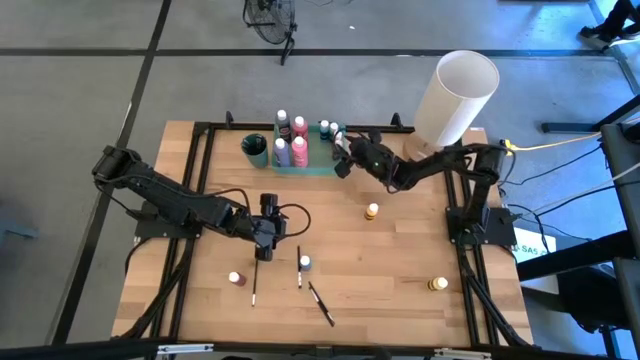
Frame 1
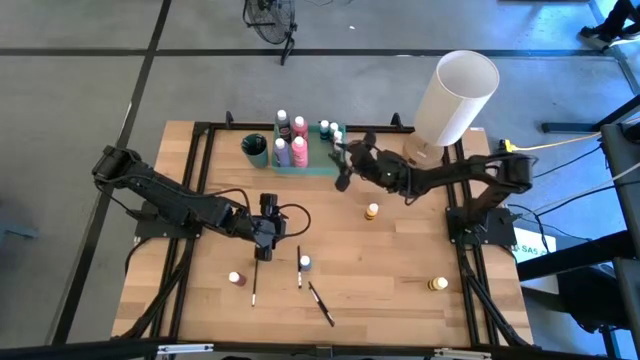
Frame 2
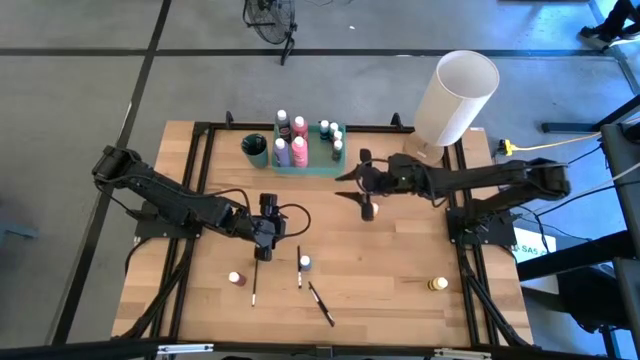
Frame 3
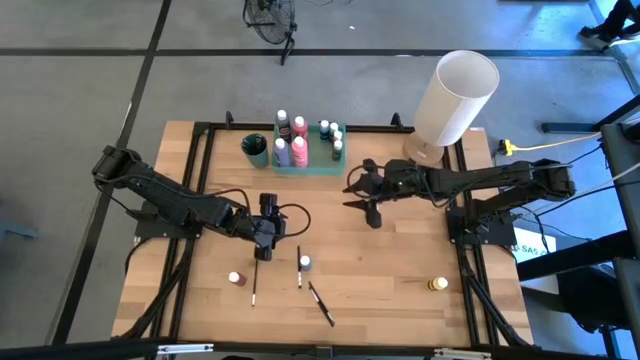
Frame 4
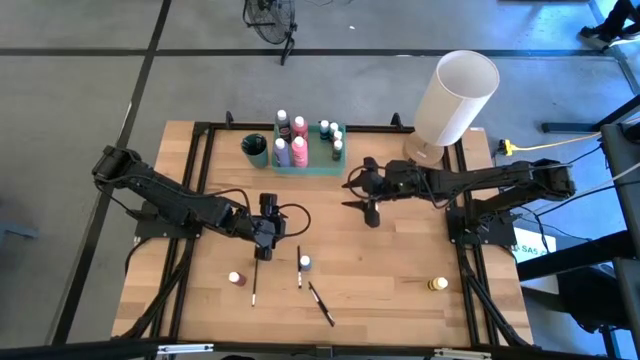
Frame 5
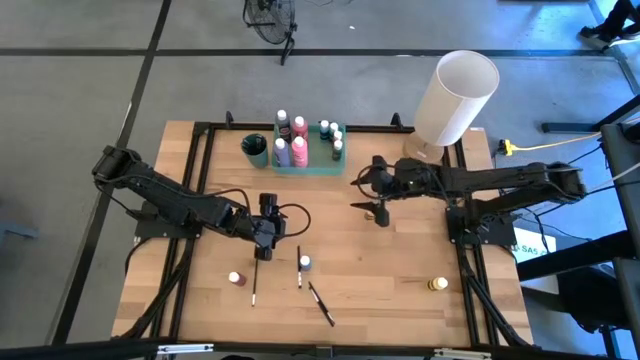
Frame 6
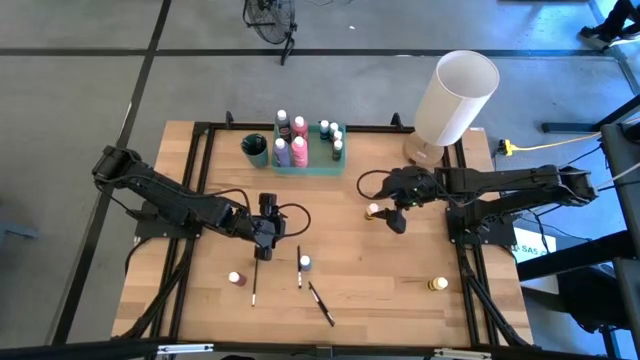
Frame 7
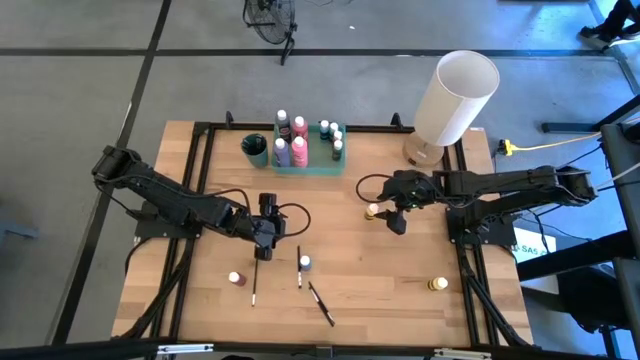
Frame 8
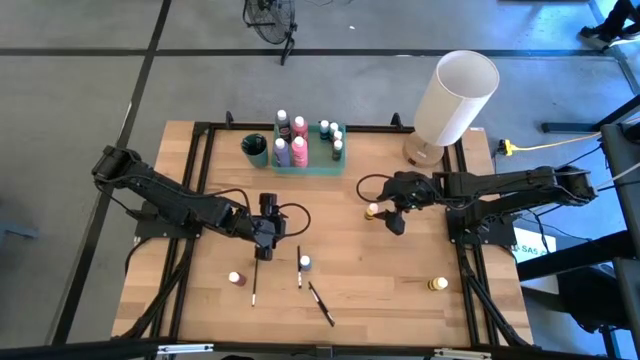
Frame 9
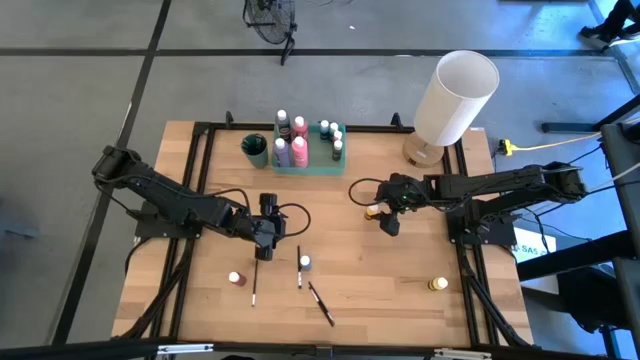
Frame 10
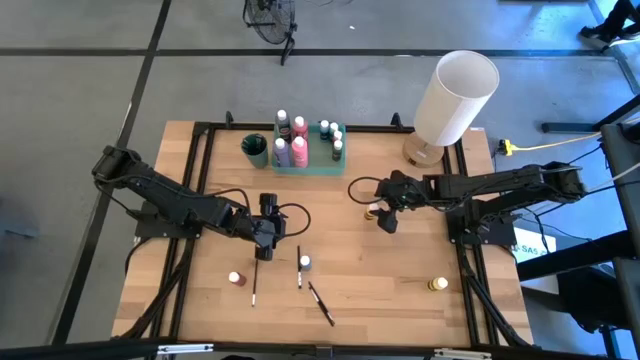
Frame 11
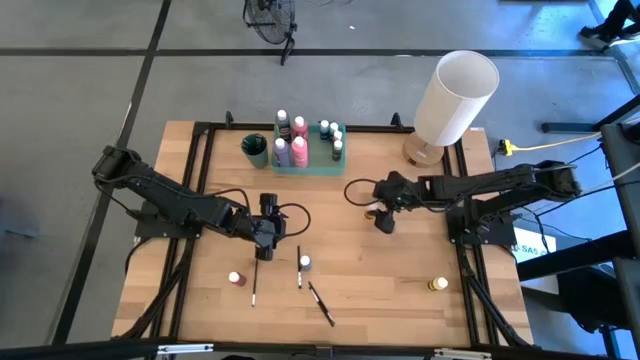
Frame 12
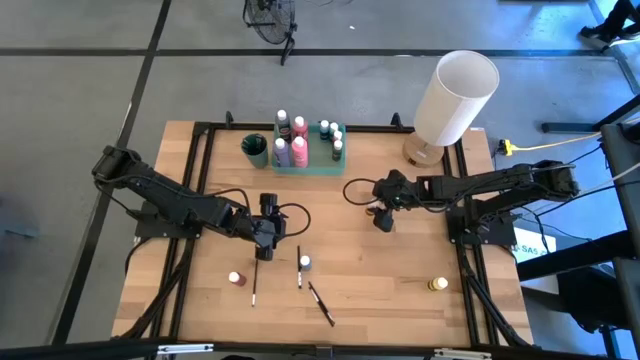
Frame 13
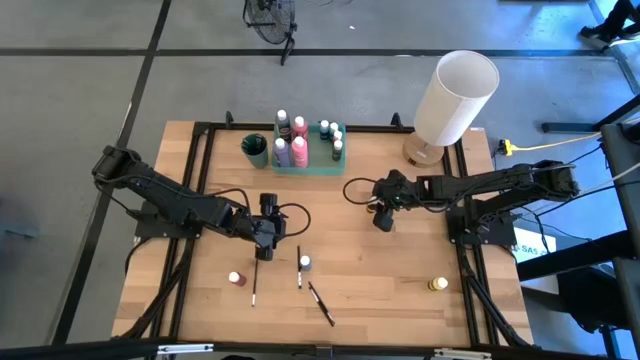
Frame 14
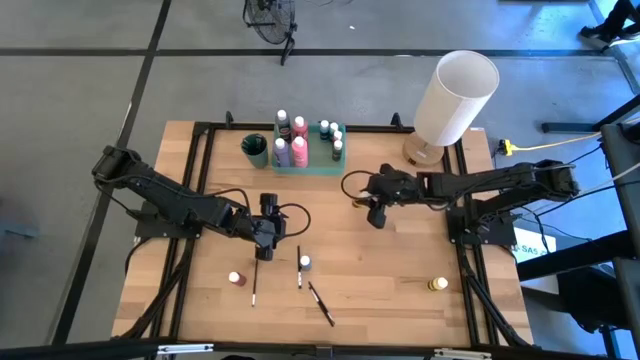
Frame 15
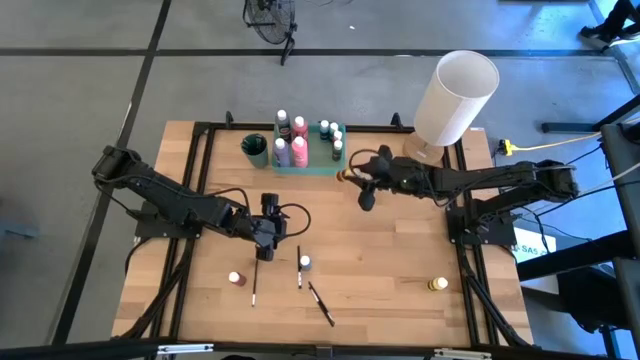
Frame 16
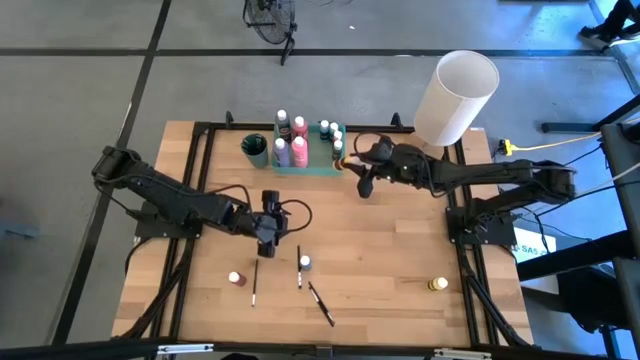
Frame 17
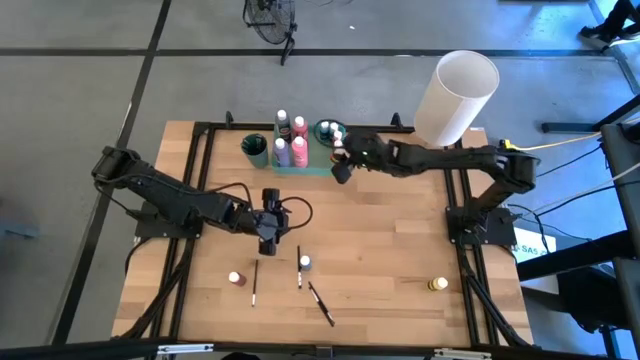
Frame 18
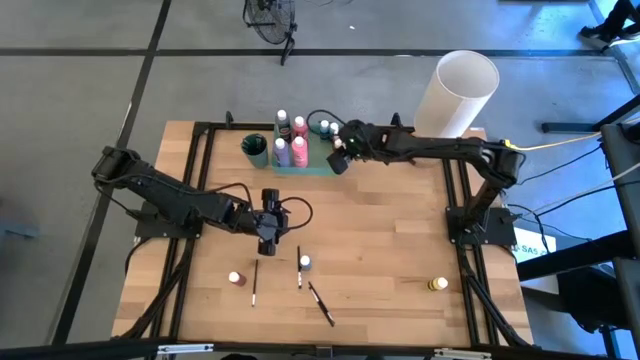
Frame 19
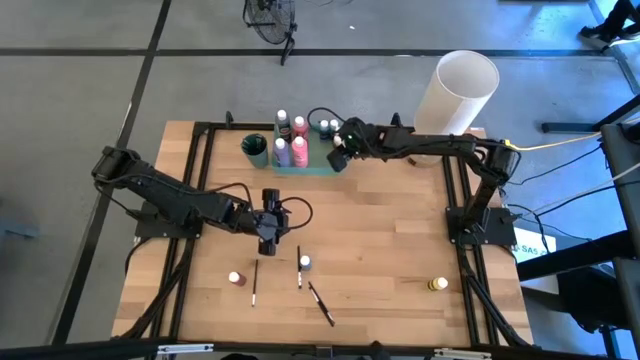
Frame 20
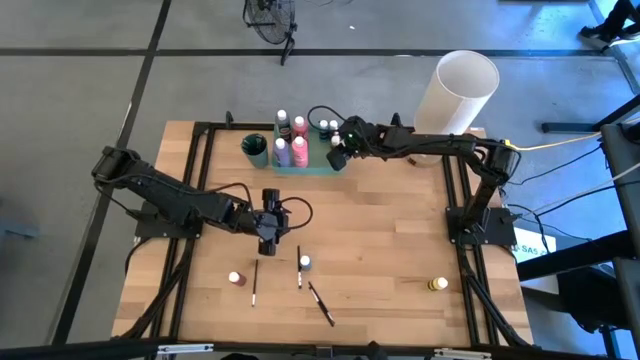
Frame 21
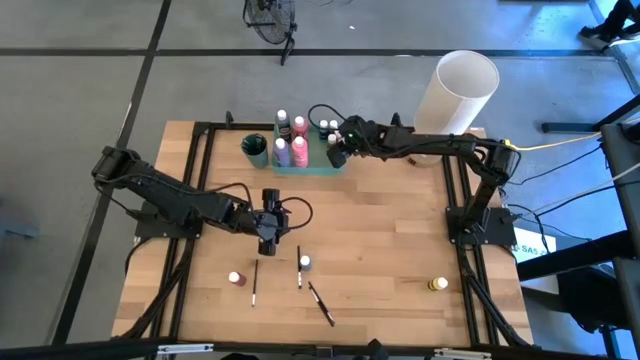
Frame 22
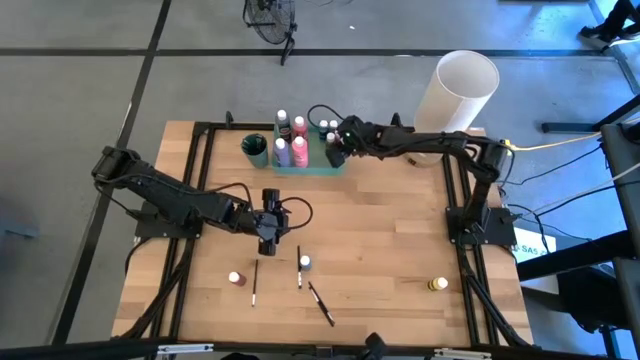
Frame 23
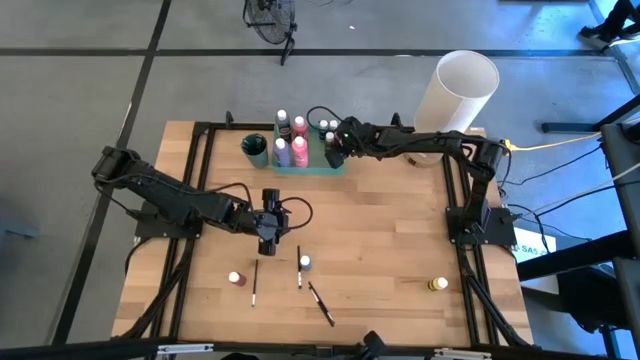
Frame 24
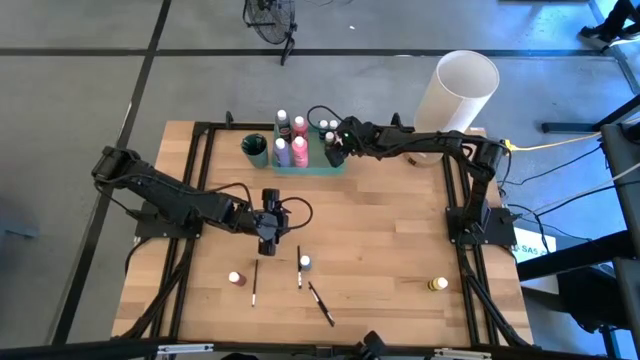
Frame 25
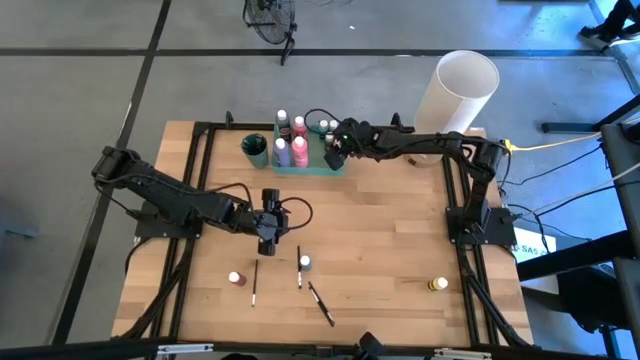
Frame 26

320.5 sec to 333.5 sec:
Task: Pick & Place Paint Supplies
Put the top small yellow paint bottle into the green bin

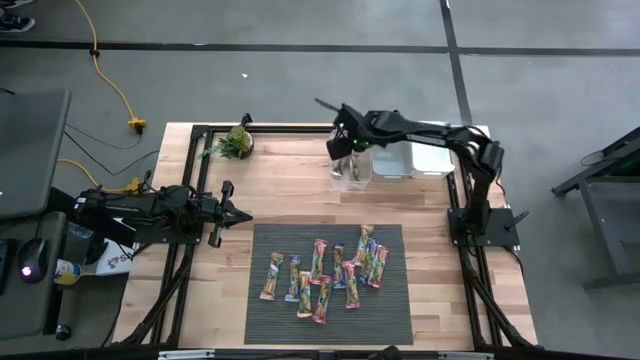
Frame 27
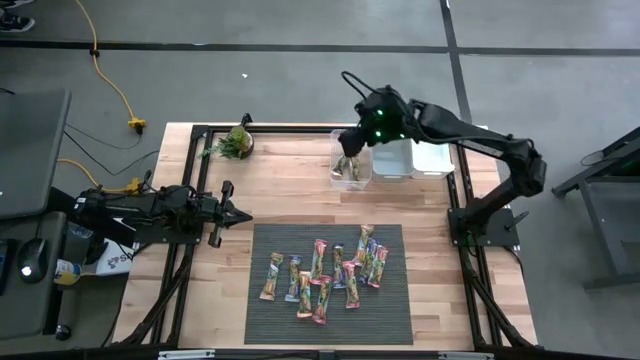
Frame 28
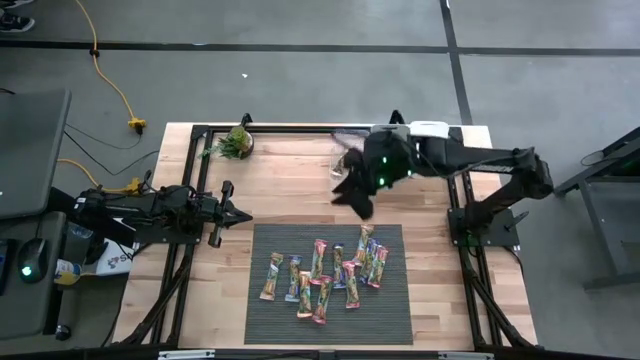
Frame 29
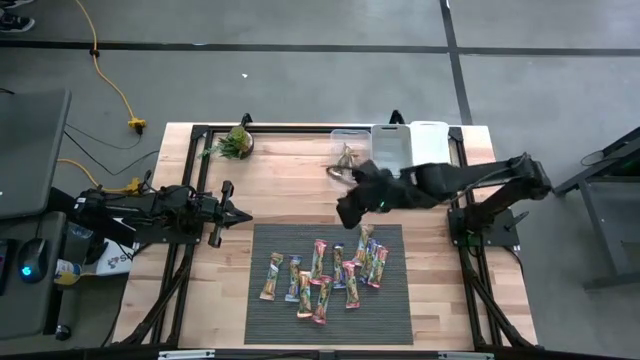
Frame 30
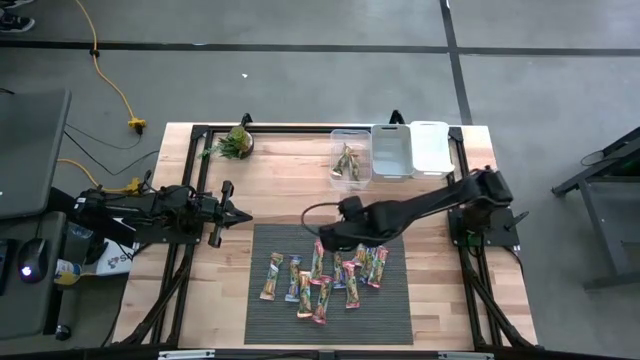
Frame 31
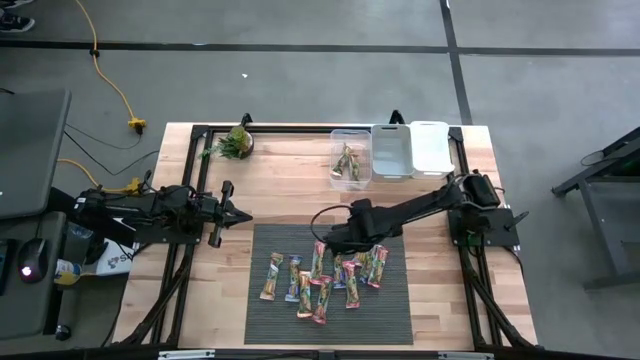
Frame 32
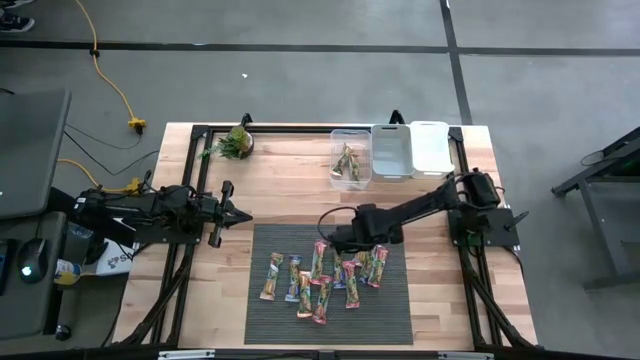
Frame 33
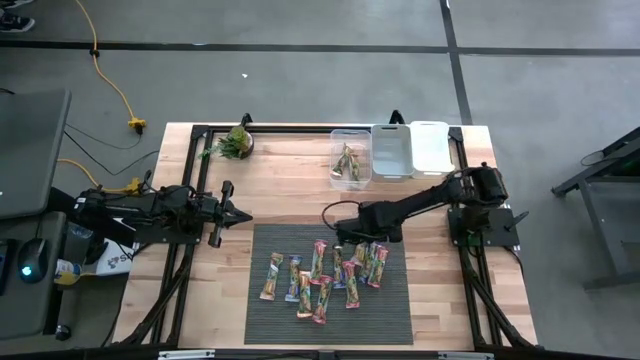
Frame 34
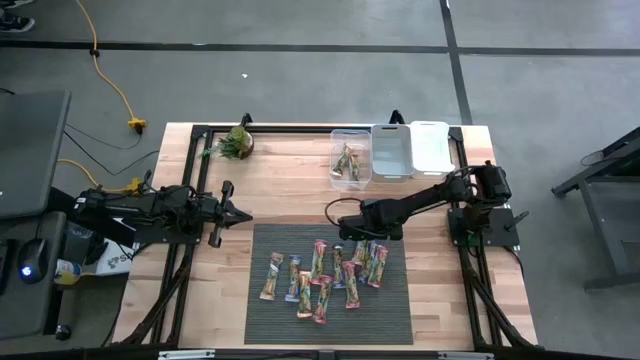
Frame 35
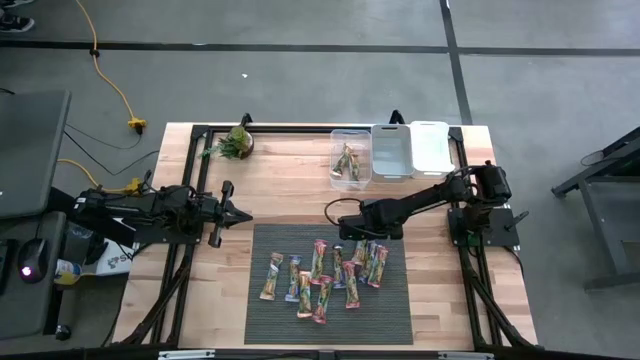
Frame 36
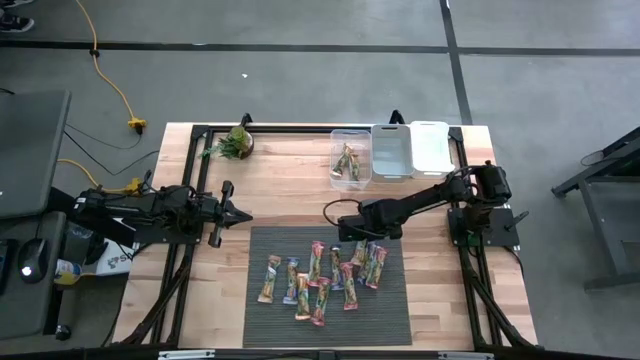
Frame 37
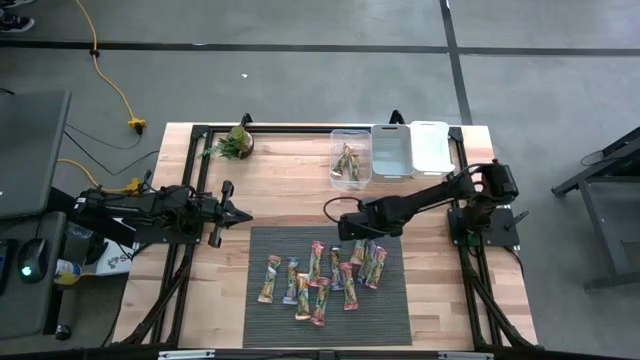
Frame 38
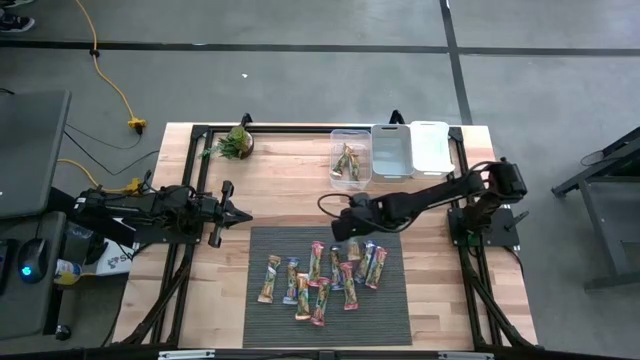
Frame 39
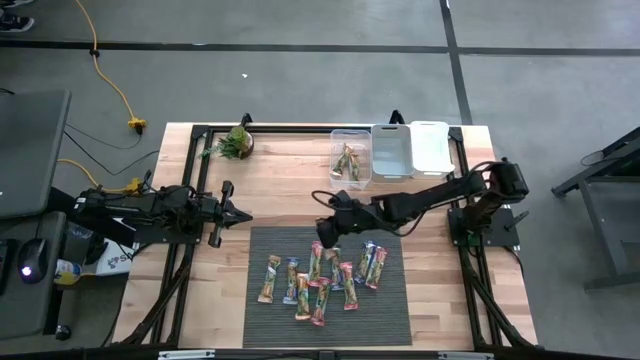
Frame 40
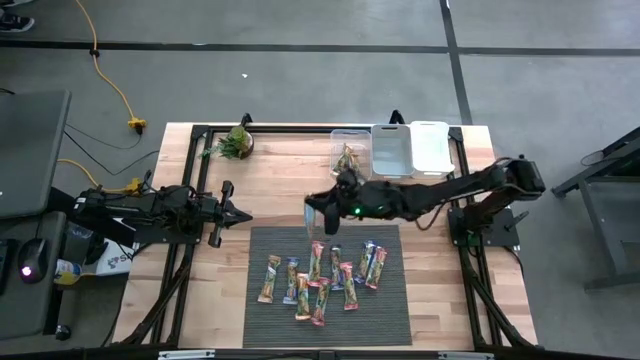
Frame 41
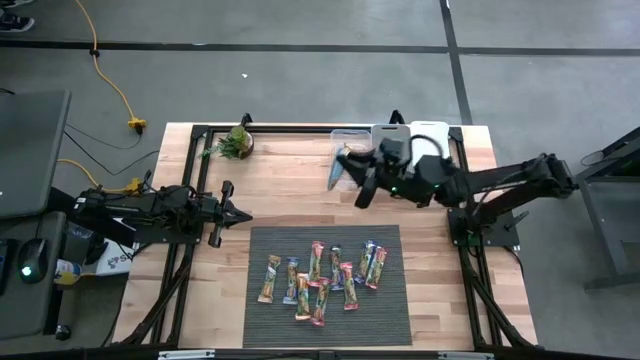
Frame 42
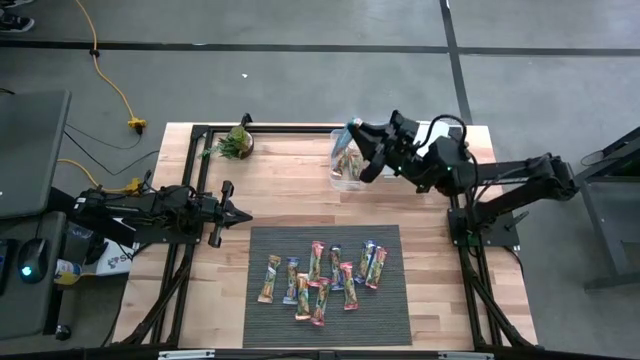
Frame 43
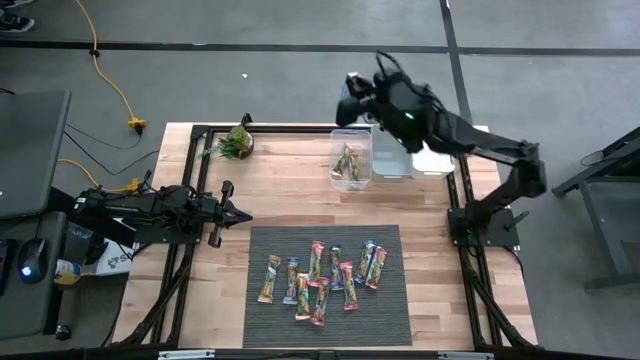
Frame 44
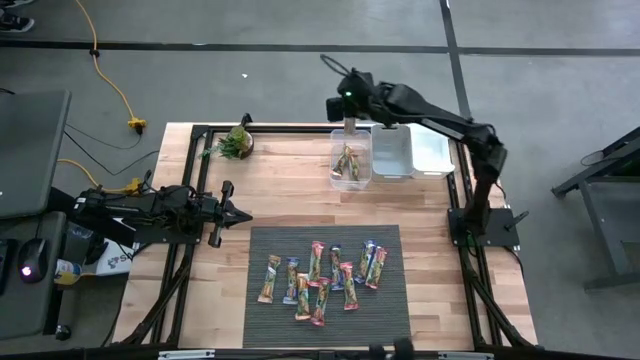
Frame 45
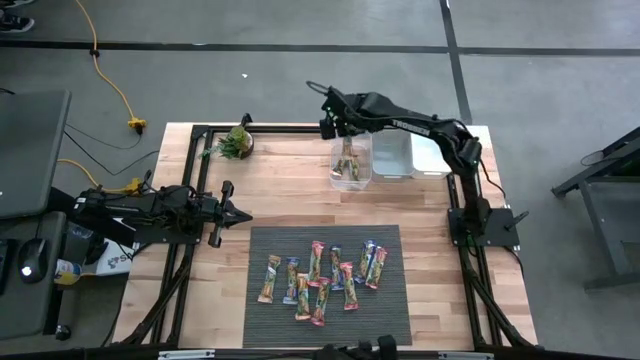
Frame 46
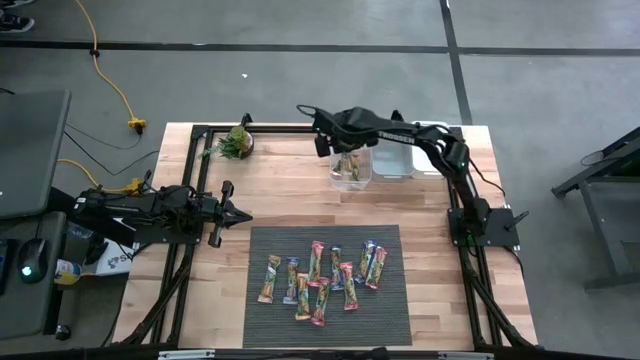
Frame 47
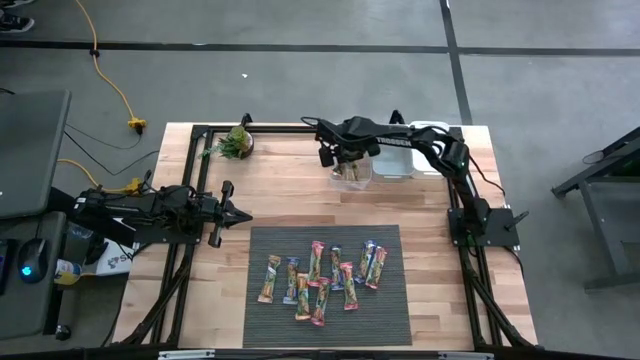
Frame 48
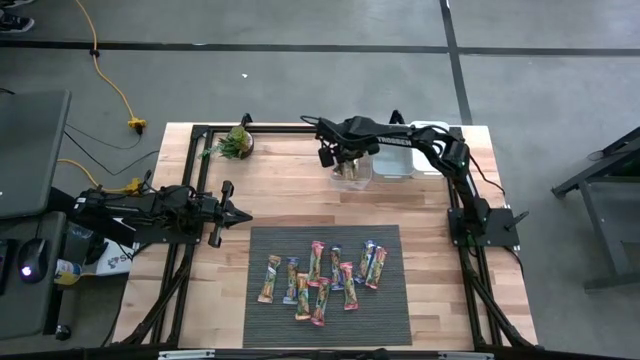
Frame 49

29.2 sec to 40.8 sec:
Task: Pick and place Granola Bars by type
Put the yellow granola bar into the transparent bin
